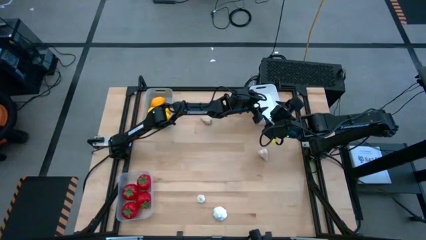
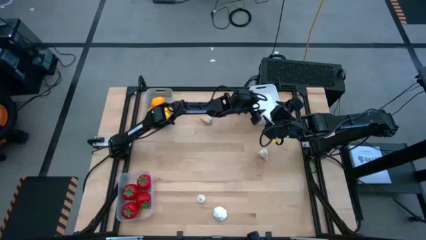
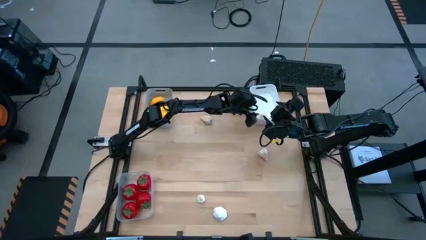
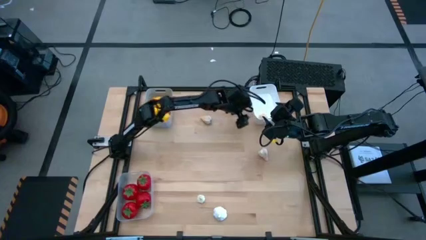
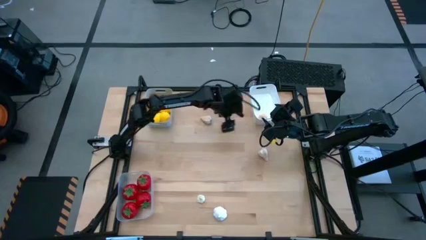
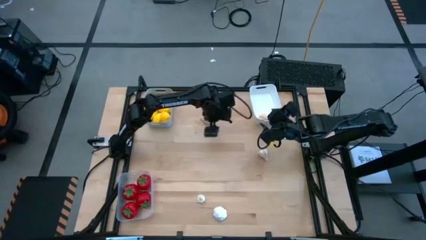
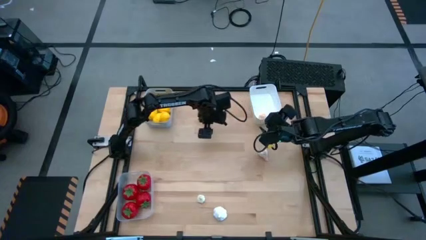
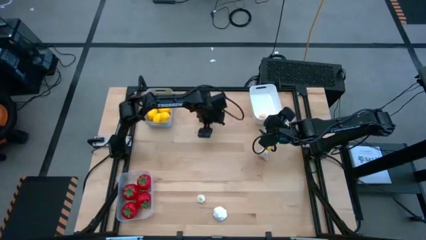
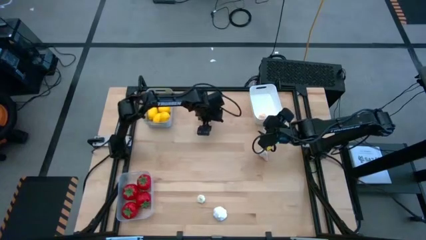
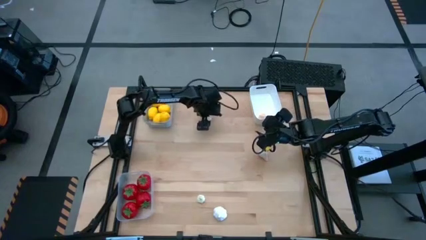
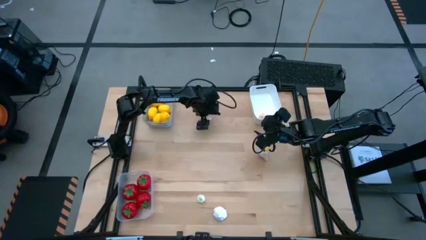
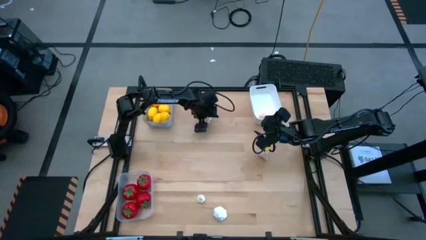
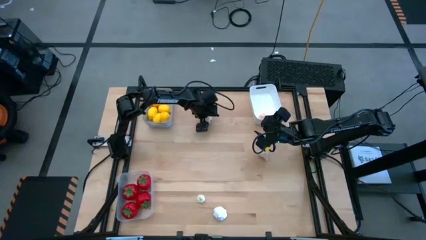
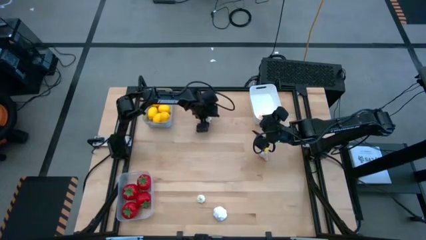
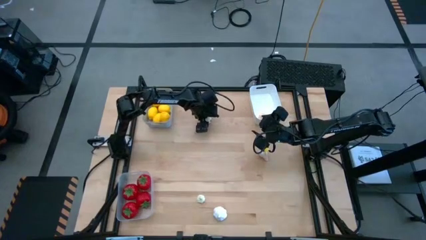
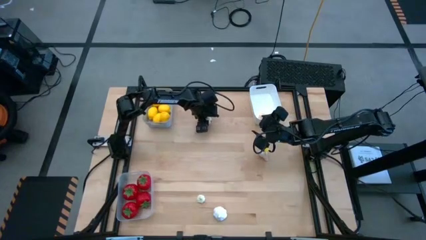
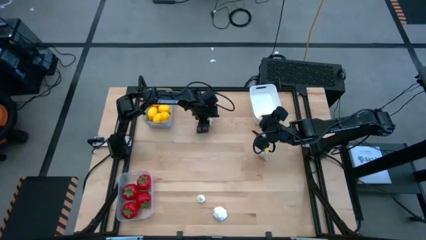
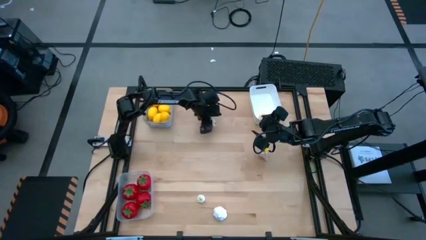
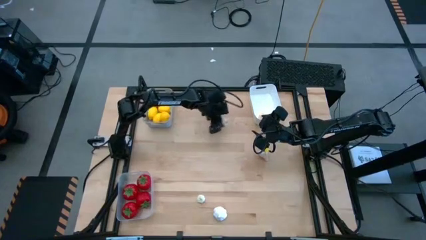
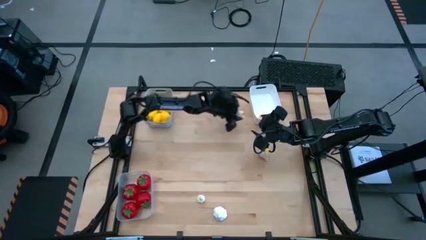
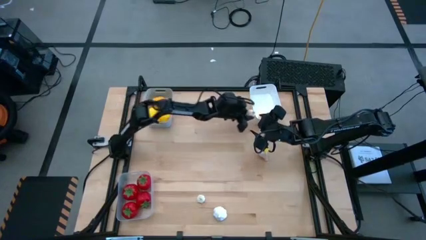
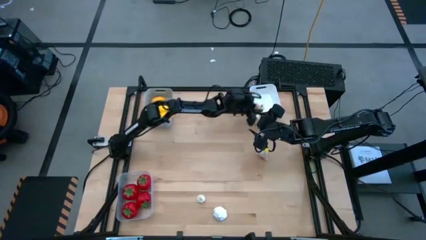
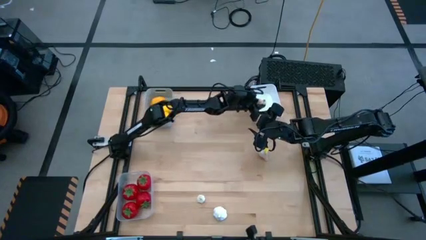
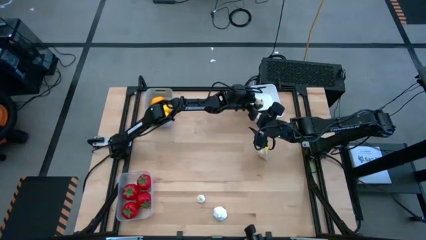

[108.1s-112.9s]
Task: Sort produce into baskets
Put the white garlic into the white bin

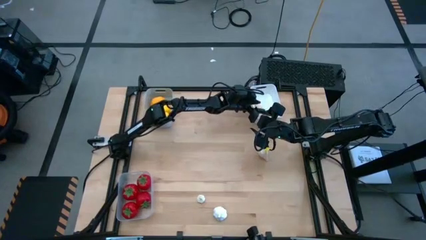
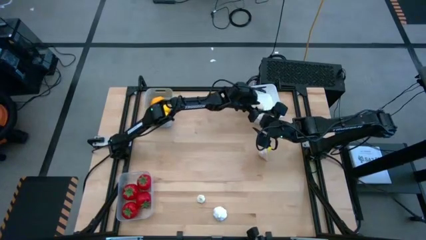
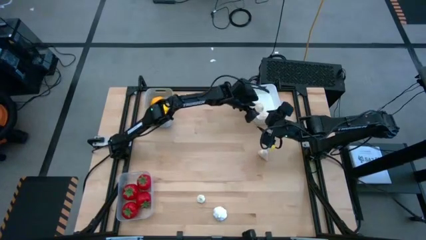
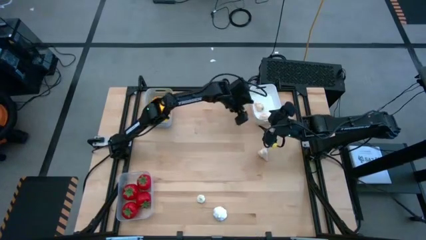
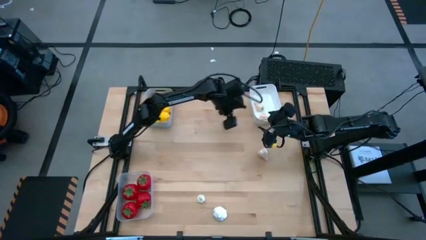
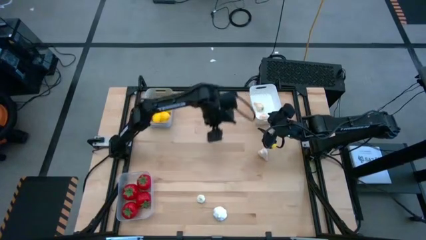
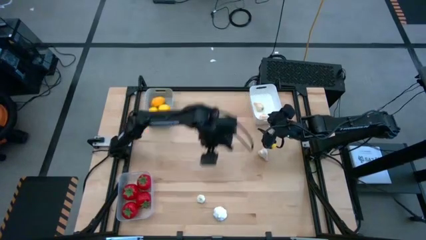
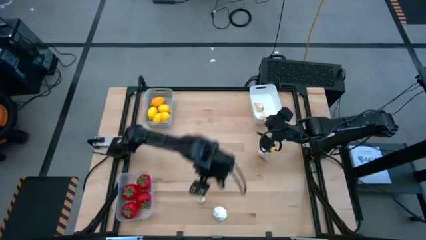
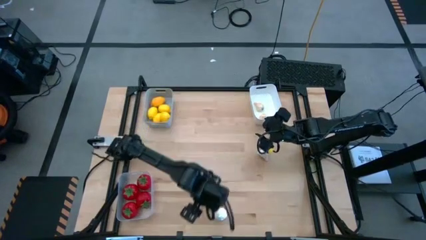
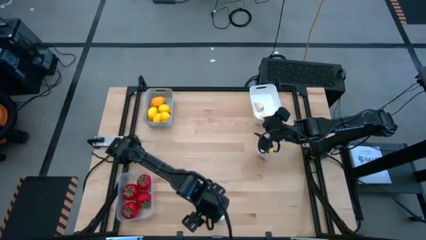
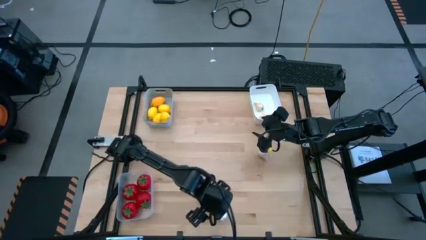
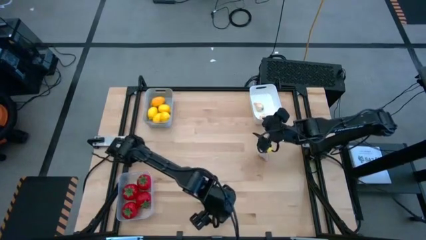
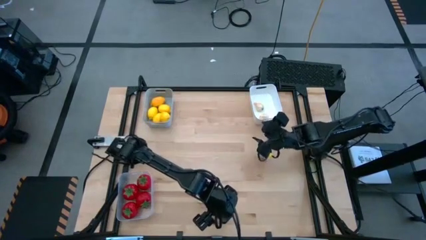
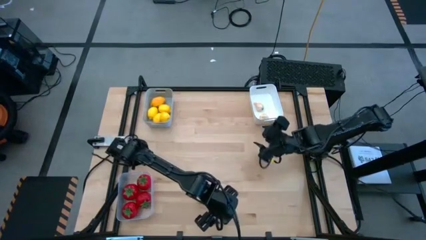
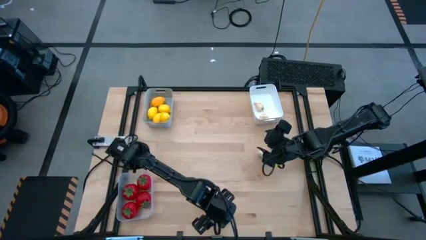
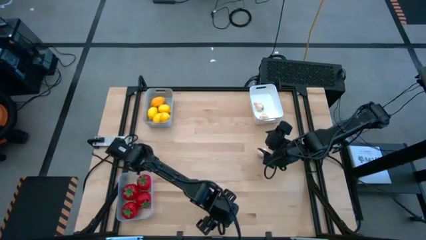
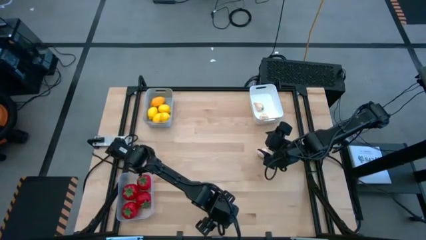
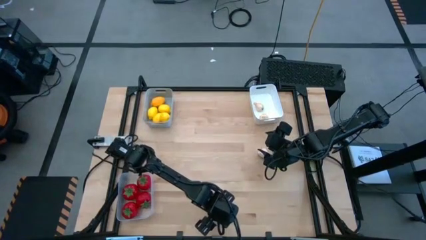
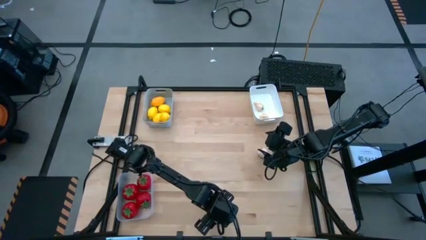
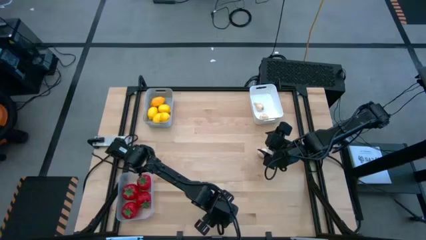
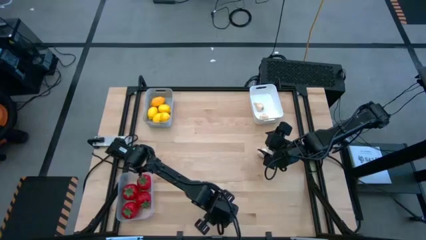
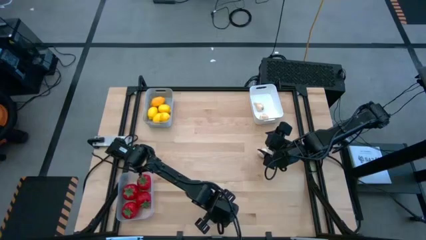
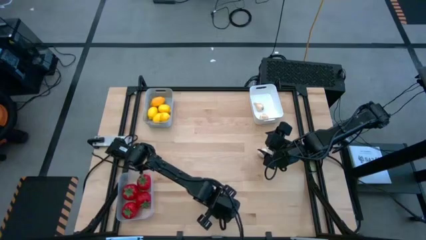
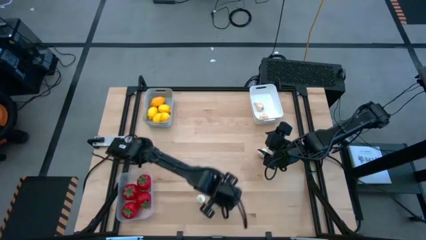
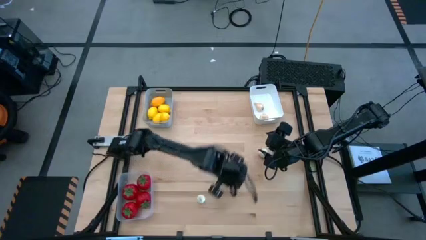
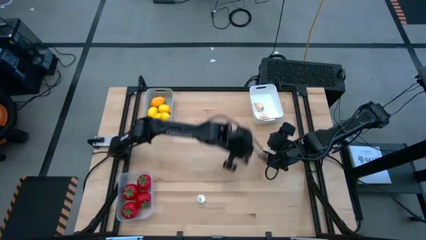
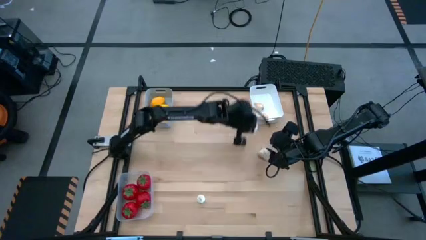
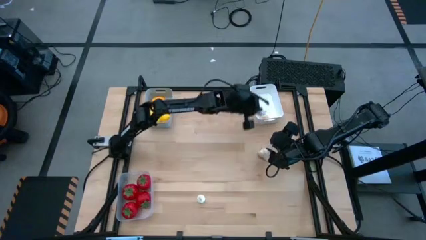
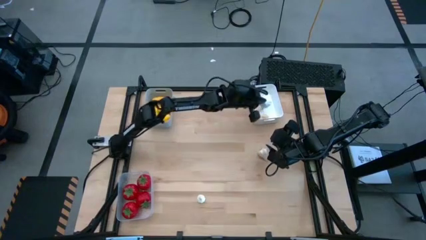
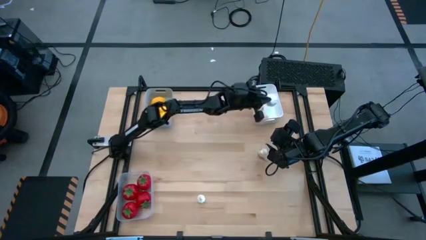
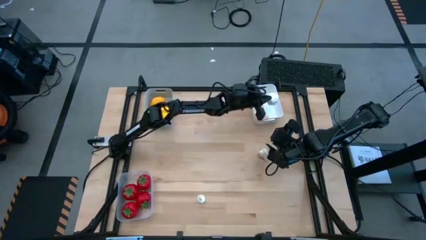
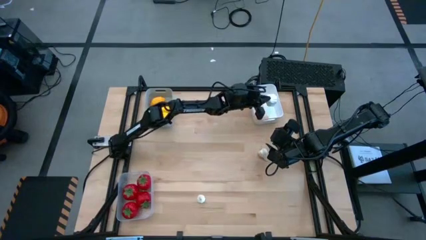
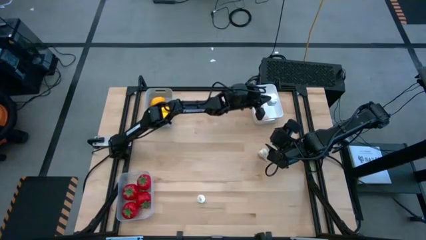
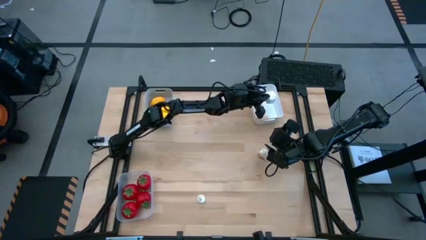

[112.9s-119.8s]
Put the white garlic into the white bin

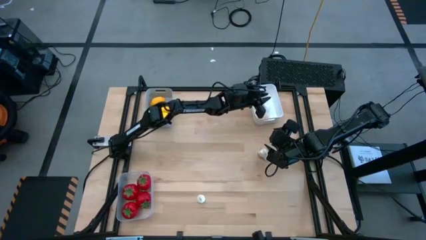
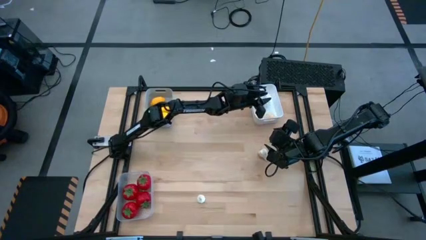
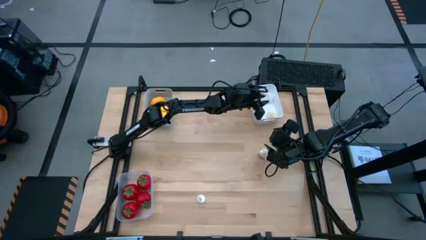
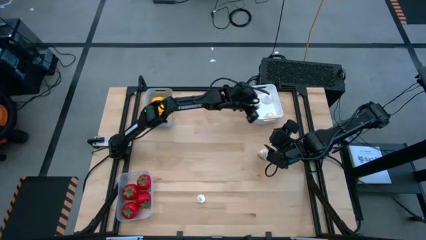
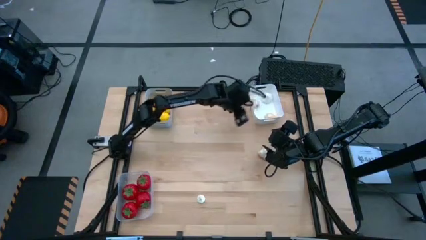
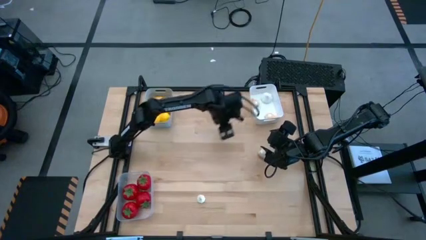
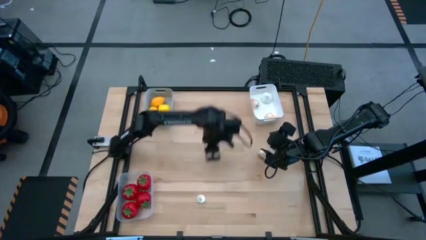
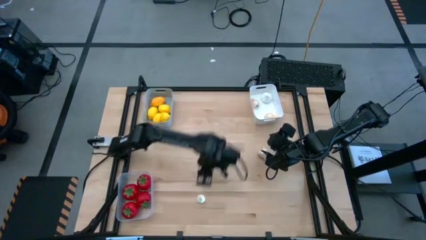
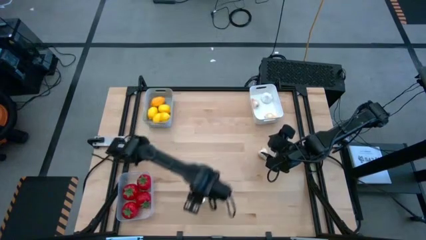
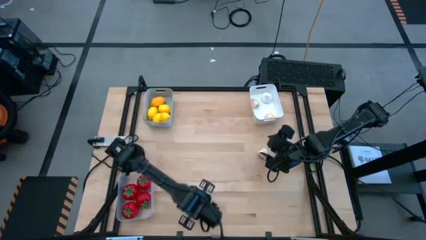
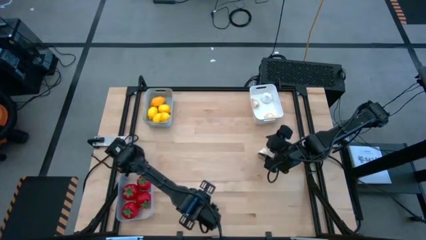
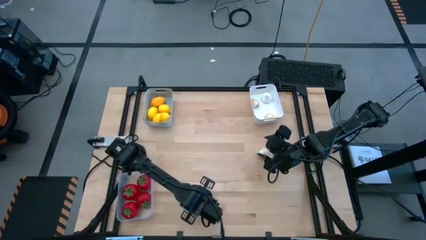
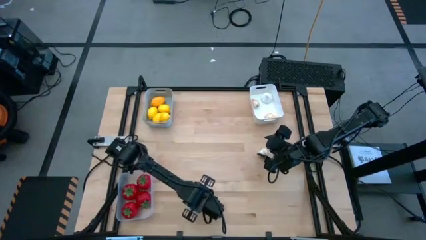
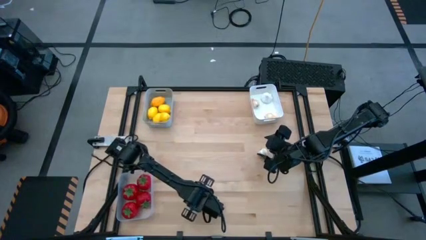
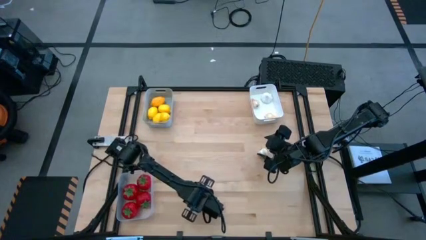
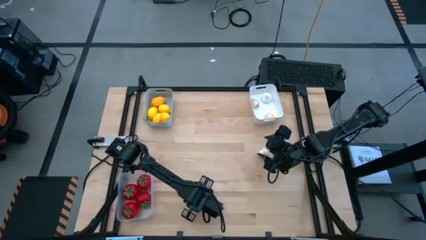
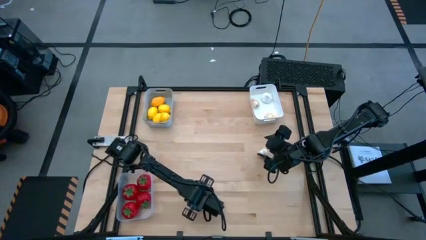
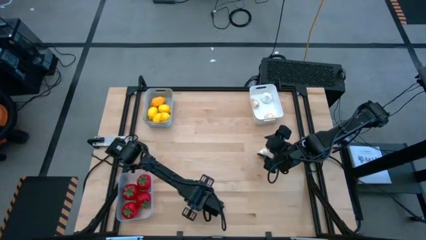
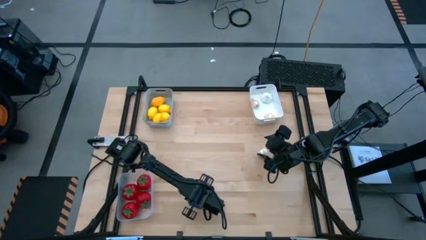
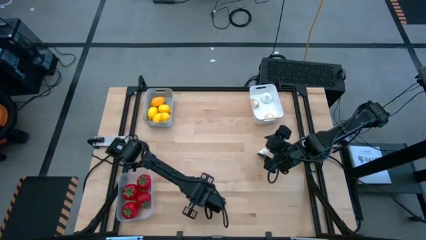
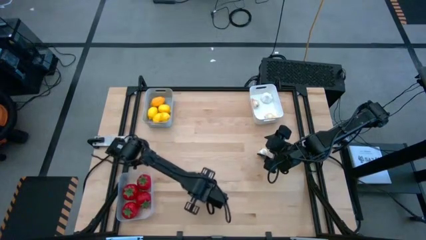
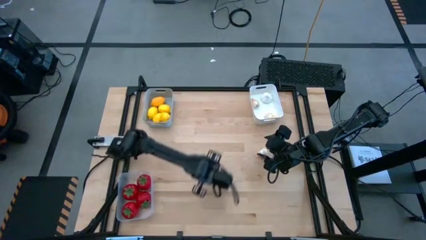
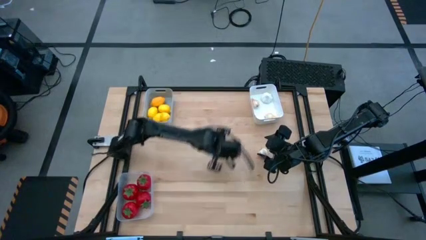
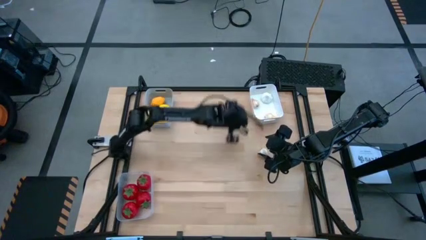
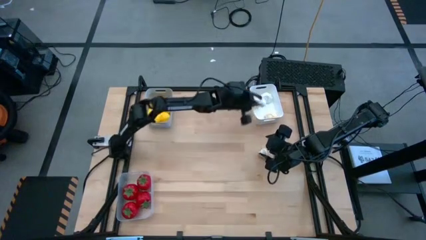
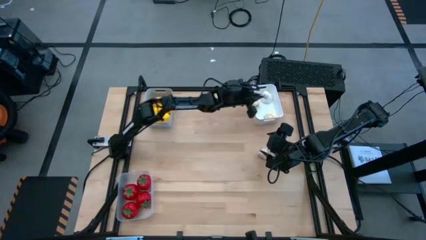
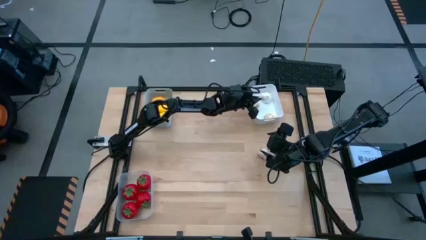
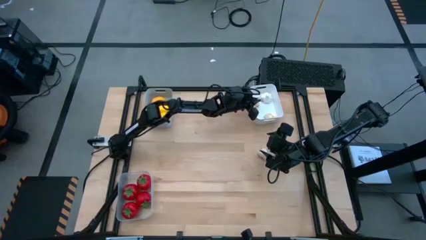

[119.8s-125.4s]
Put the white garlic into the white bin
